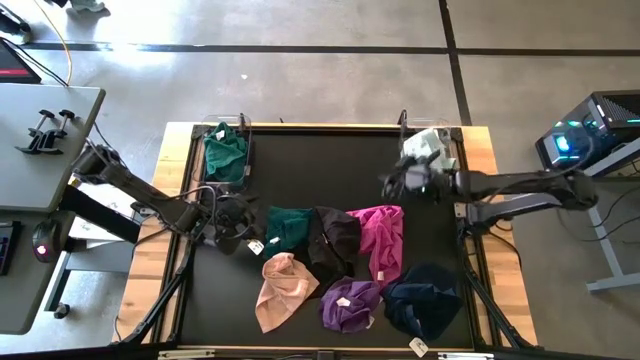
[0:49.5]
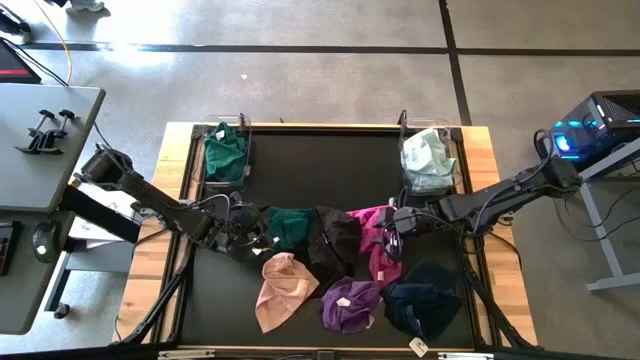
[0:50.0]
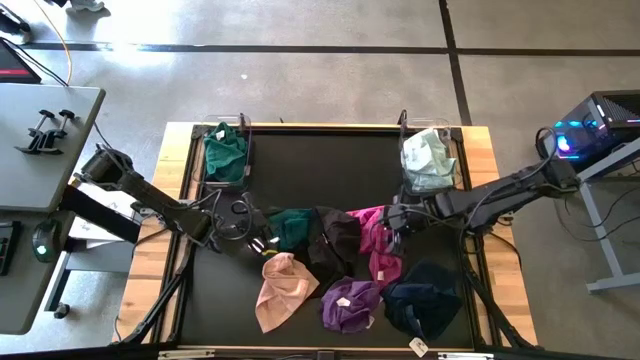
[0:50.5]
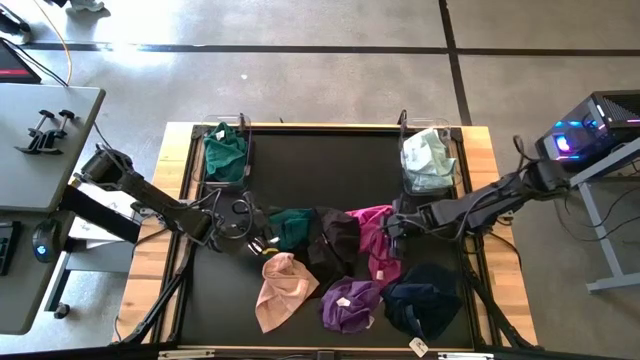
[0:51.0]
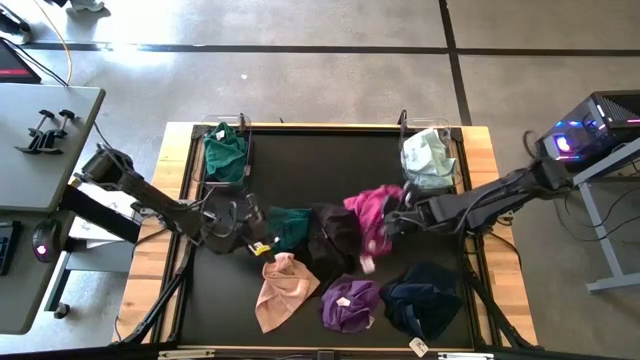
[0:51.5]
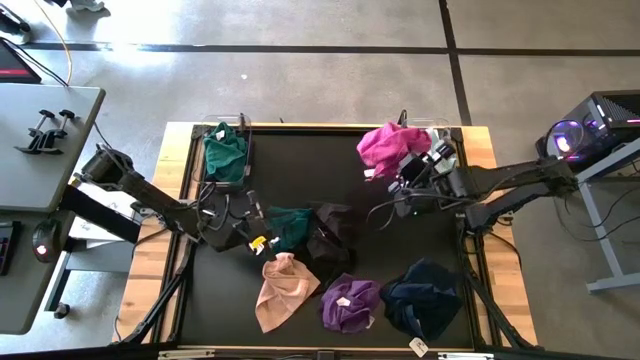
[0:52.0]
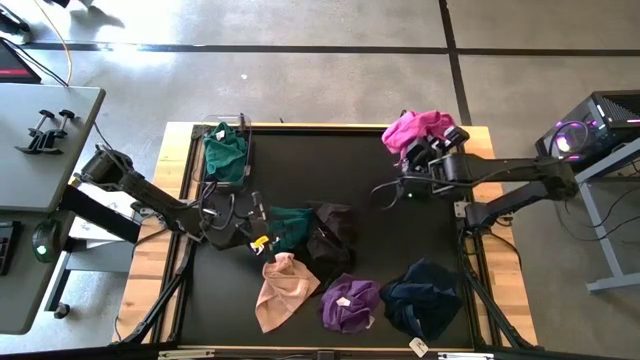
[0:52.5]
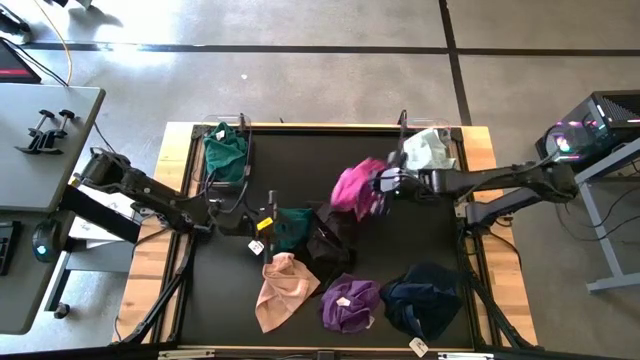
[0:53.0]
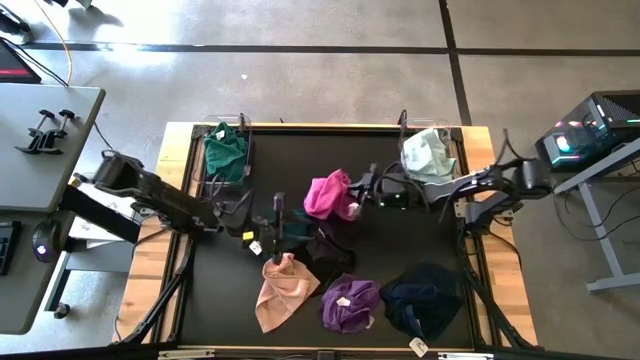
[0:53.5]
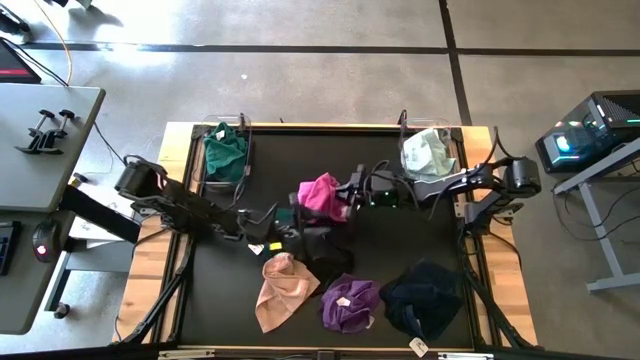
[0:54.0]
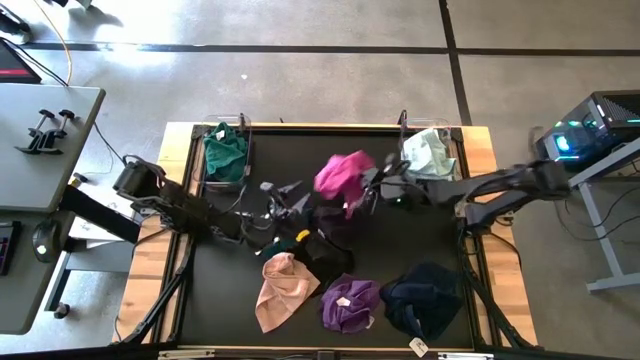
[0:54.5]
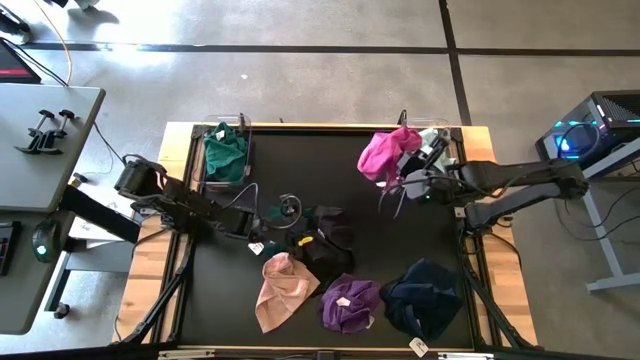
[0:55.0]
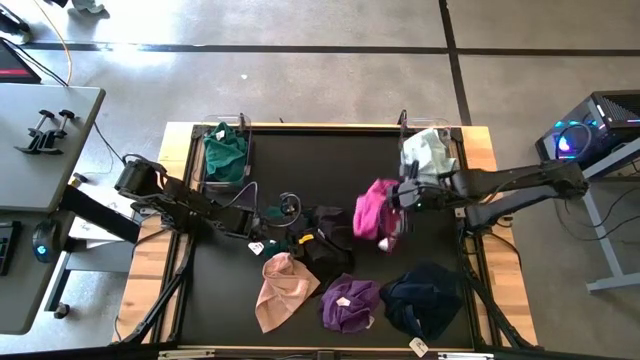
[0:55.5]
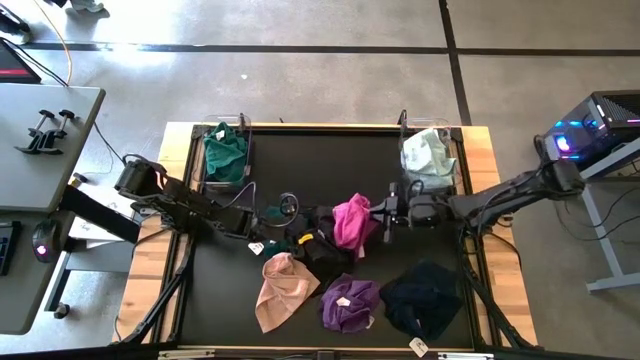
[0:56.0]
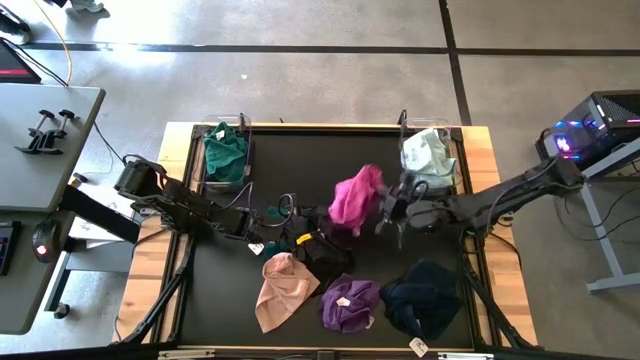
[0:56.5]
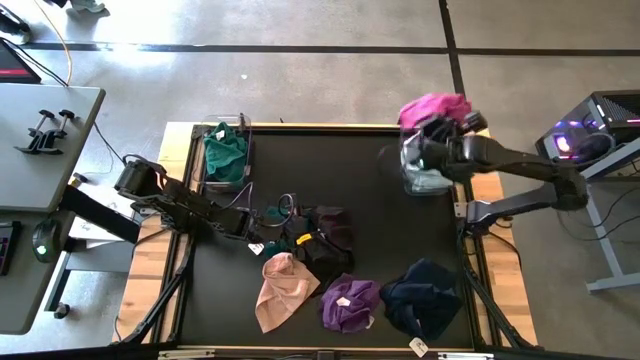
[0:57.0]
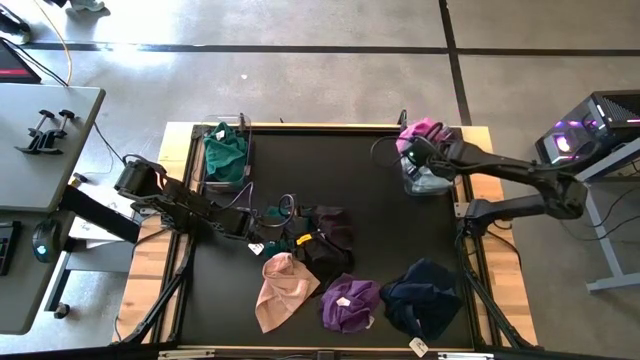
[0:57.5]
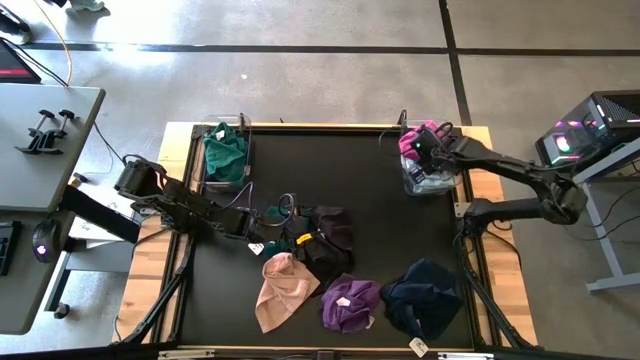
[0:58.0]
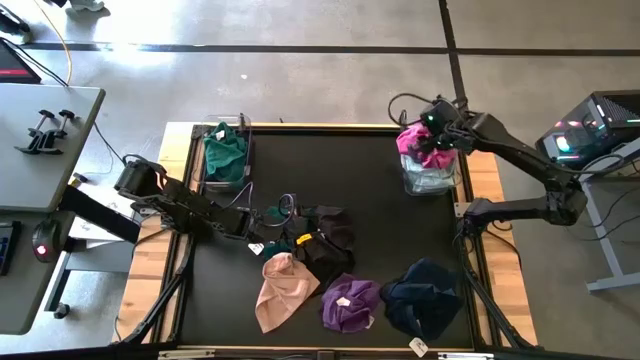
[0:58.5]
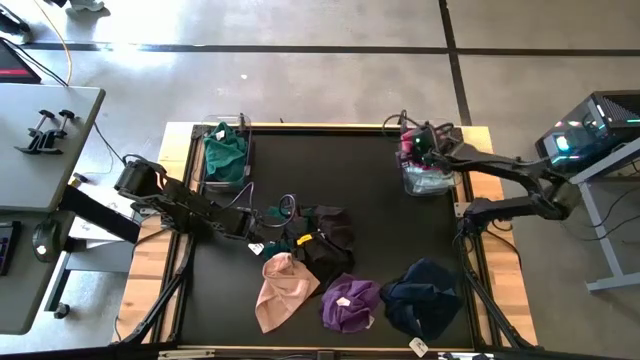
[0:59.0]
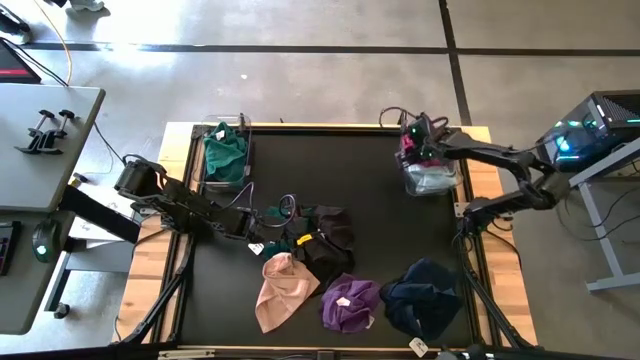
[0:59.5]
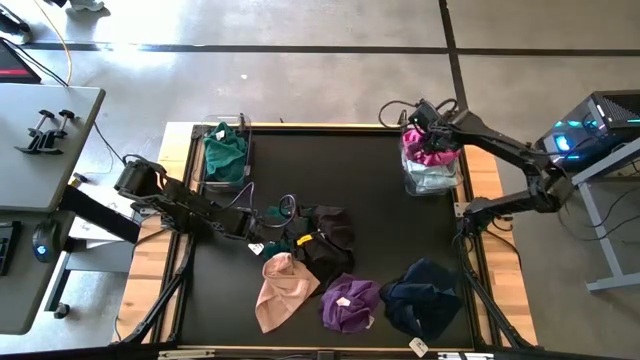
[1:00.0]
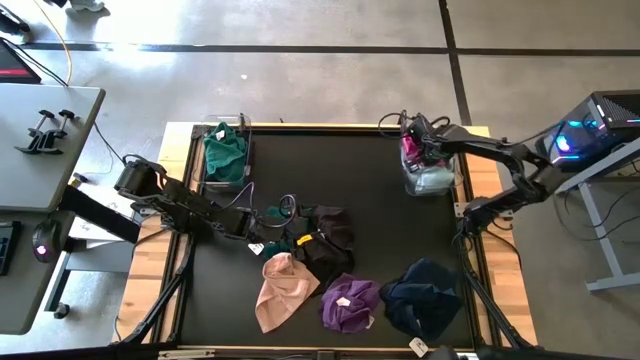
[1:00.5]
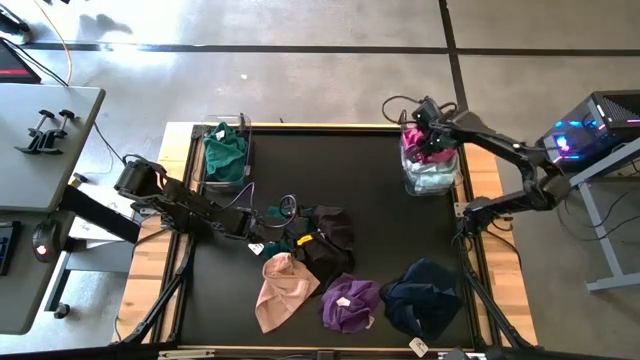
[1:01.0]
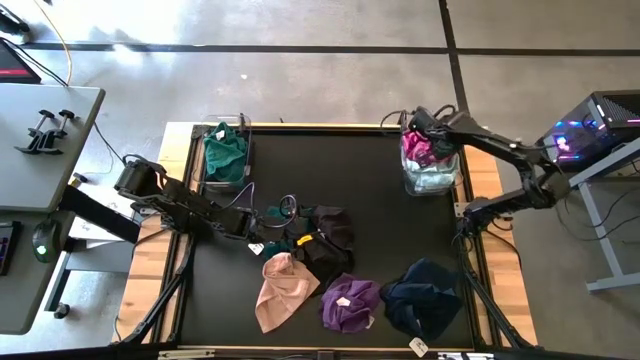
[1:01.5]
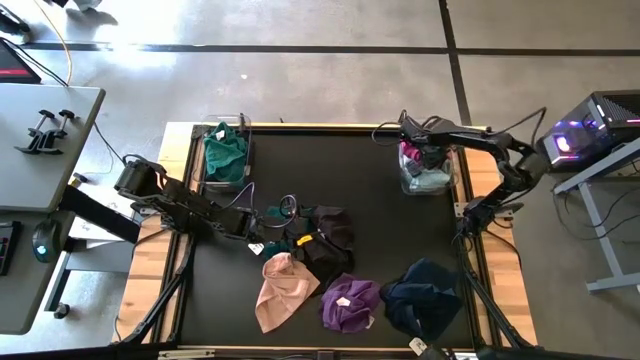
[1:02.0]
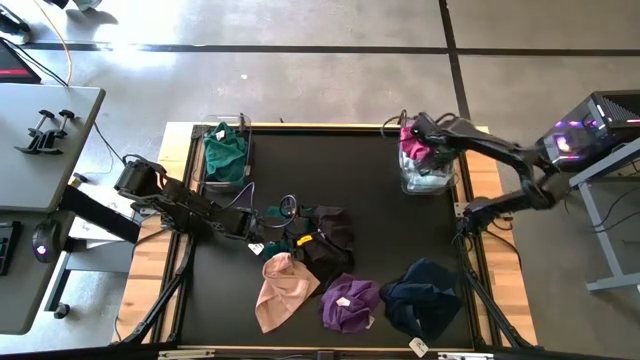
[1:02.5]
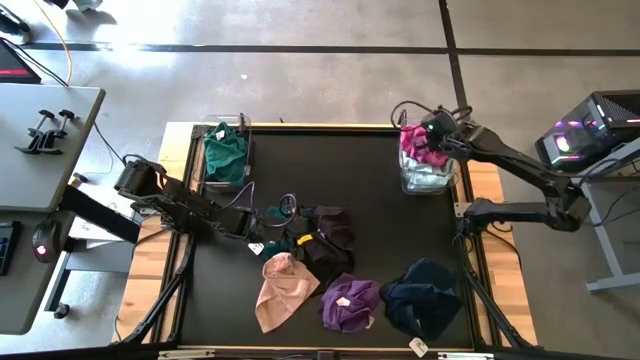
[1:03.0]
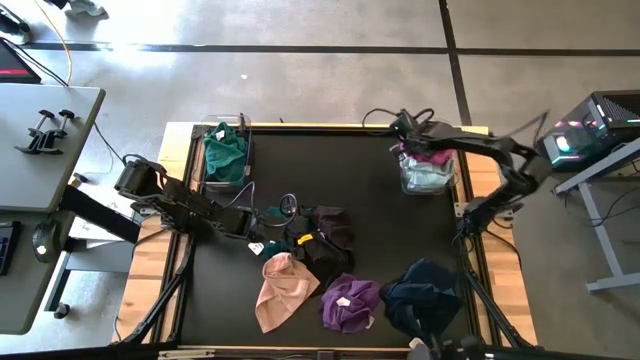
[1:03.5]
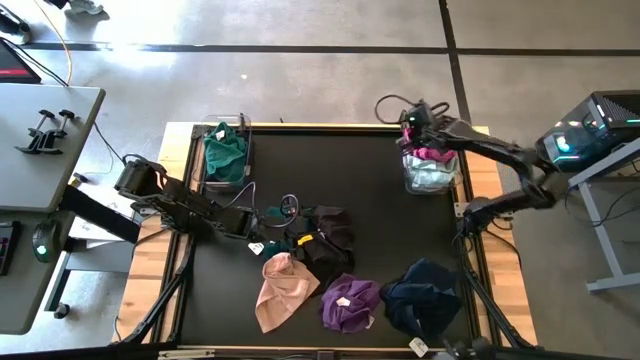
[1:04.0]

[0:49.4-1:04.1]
Task: Sort towels by color in basket
Put the pink microfiber cloth into the right transparent bin

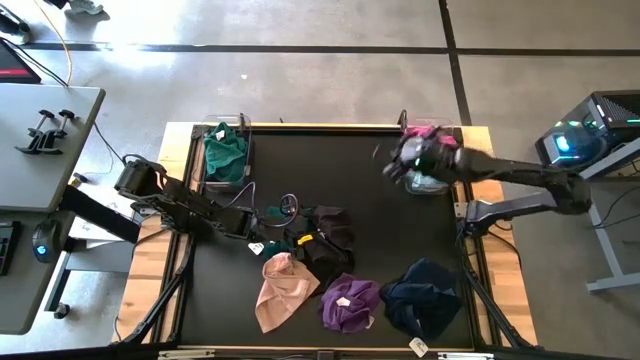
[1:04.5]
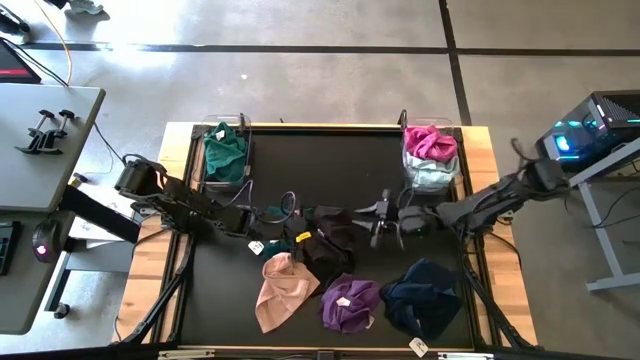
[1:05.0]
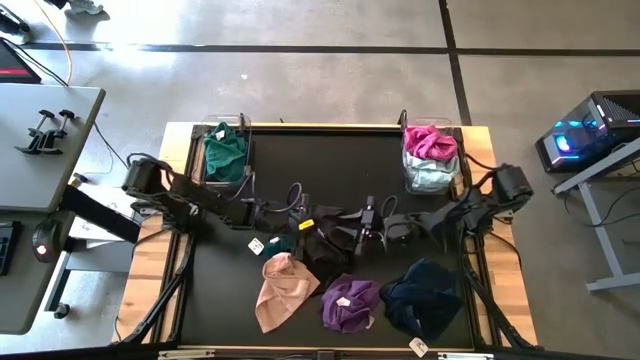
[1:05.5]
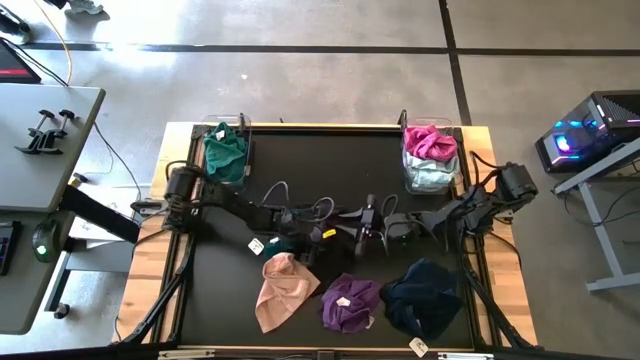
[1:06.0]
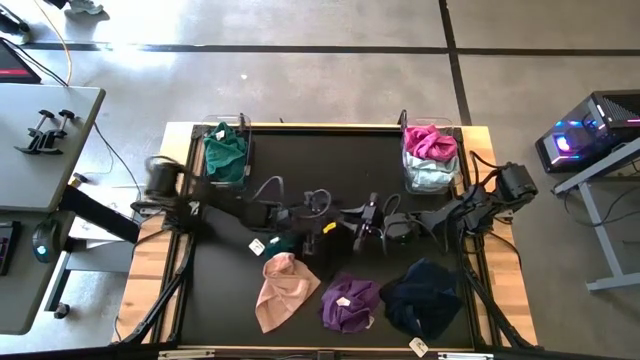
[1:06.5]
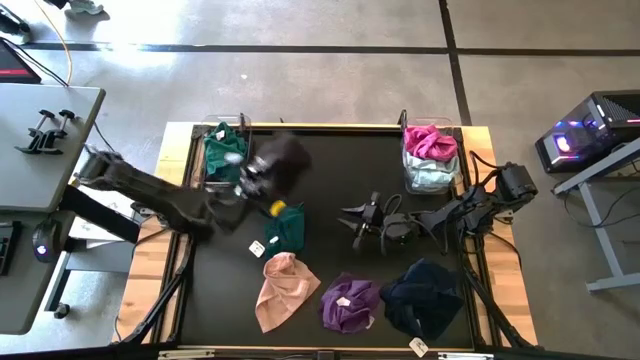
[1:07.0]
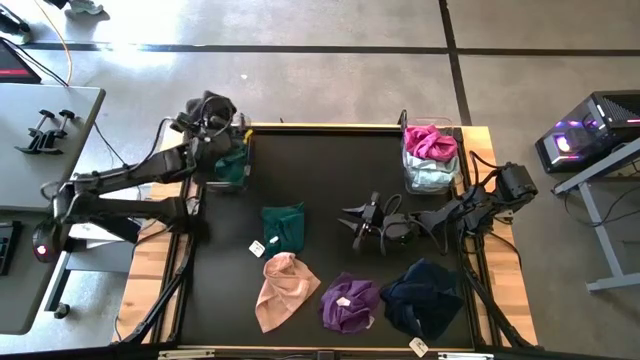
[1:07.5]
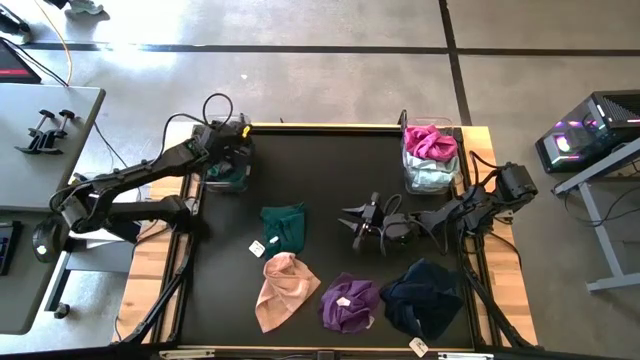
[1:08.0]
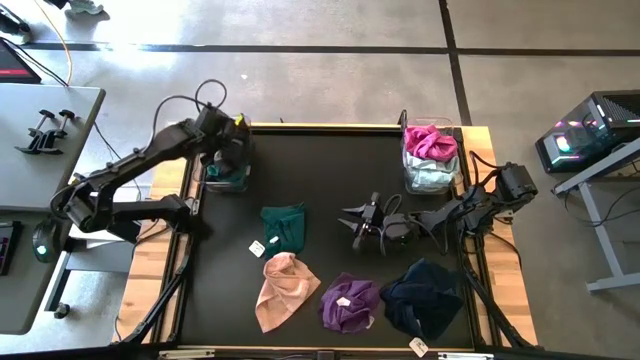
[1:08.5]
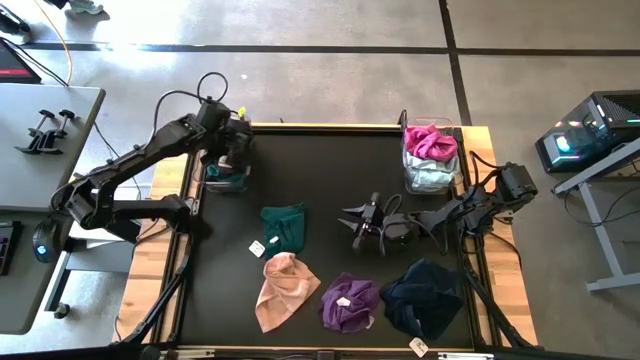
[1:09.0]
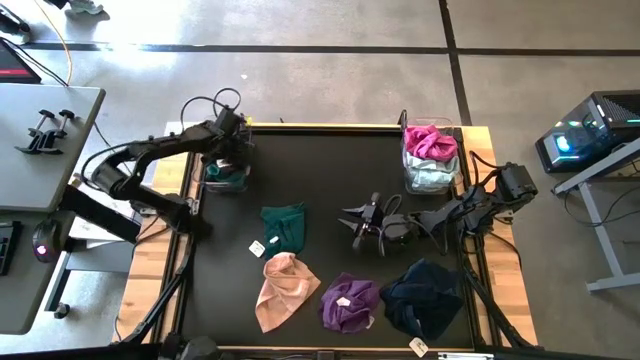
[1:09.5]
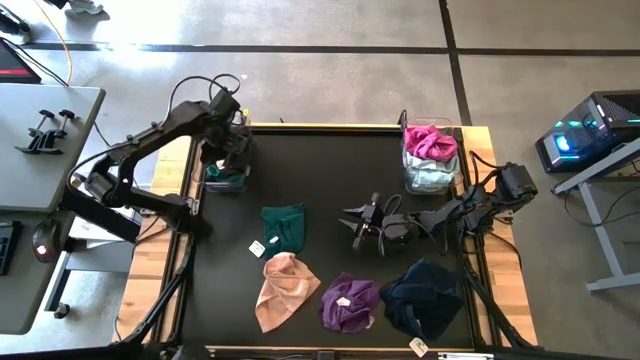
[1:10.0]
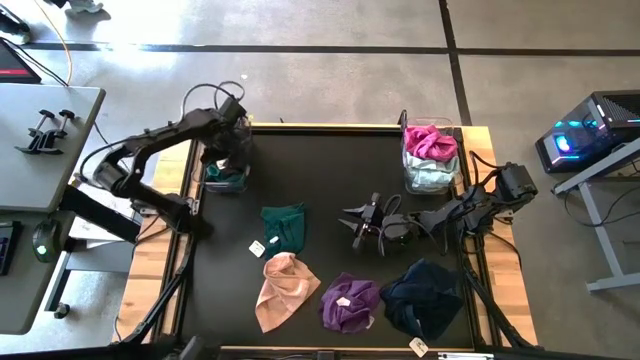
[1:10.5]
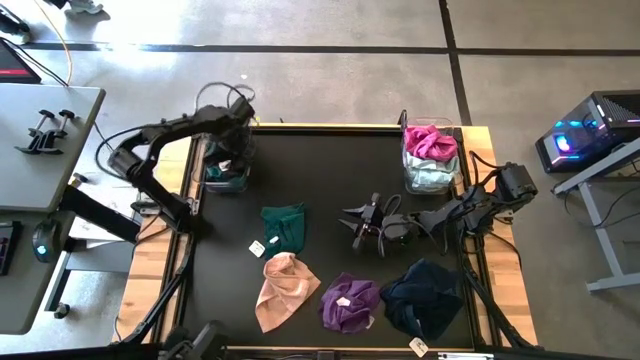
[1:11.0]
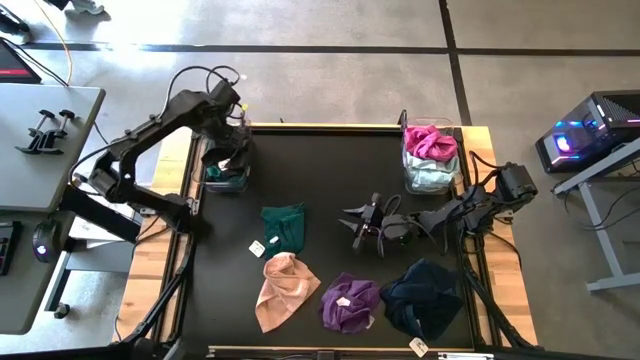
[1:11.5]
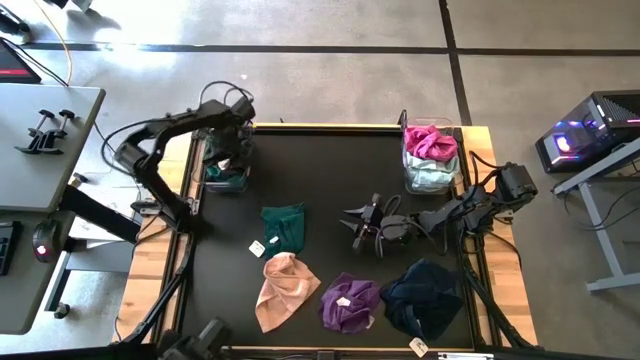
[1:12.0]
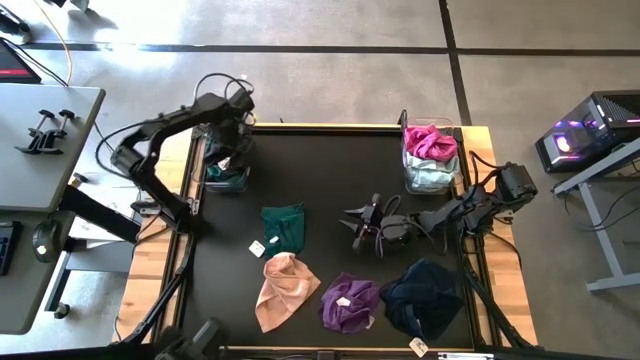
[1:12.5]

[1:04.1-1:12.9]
Put the black microfiber cloth into the left transparent bin
